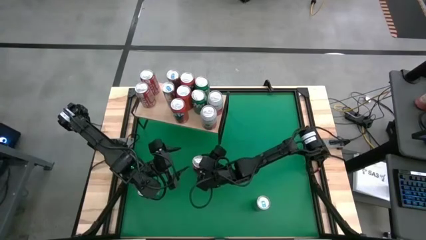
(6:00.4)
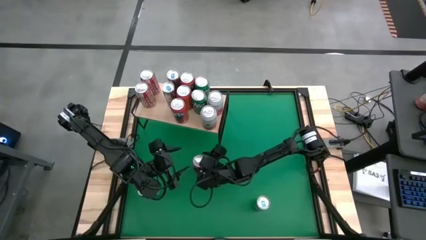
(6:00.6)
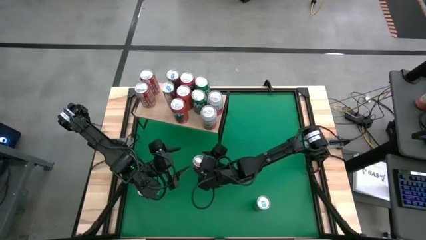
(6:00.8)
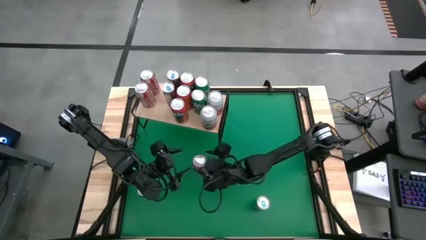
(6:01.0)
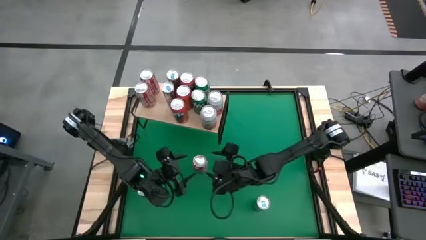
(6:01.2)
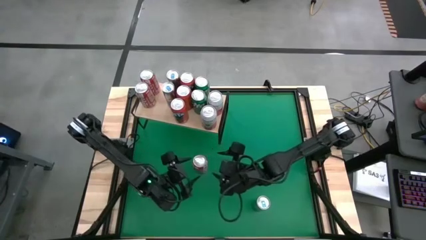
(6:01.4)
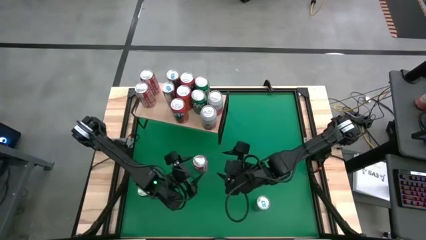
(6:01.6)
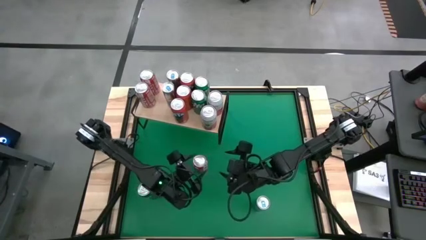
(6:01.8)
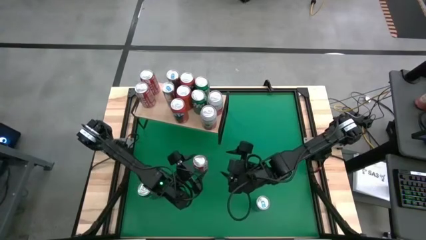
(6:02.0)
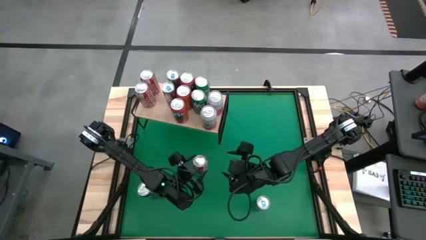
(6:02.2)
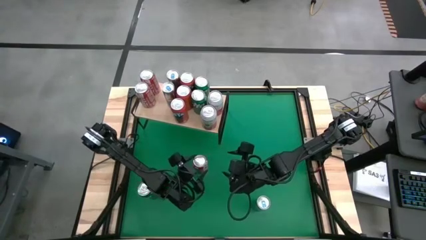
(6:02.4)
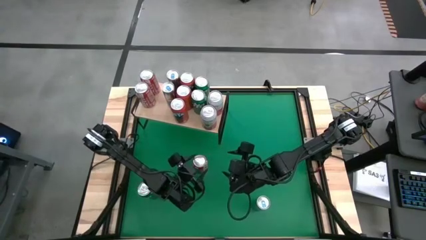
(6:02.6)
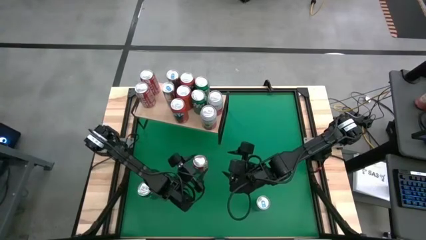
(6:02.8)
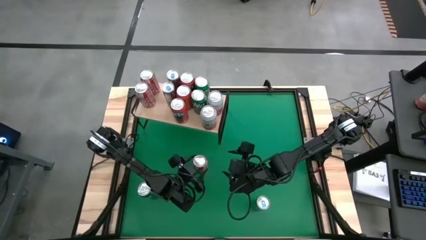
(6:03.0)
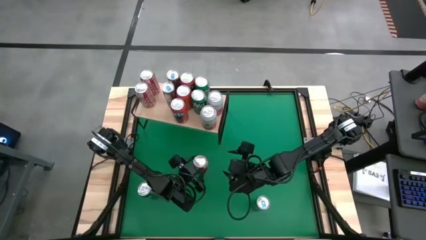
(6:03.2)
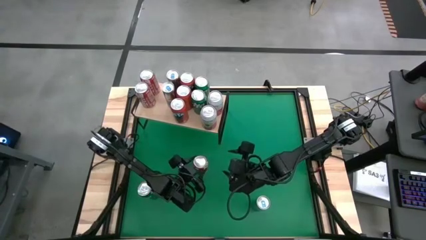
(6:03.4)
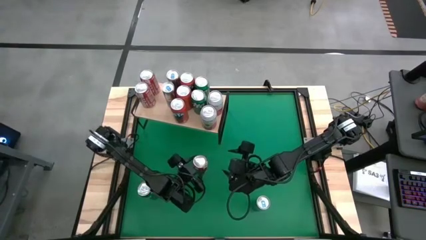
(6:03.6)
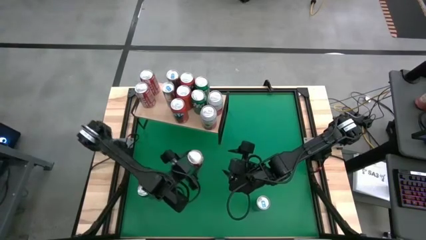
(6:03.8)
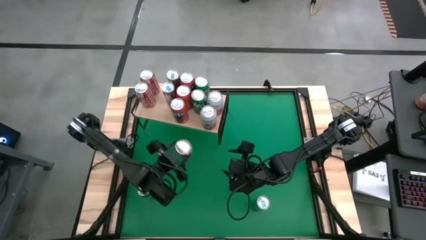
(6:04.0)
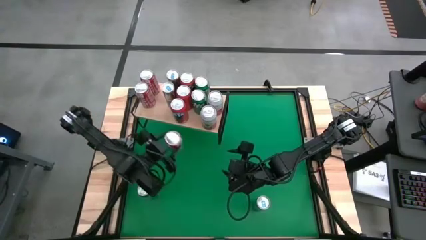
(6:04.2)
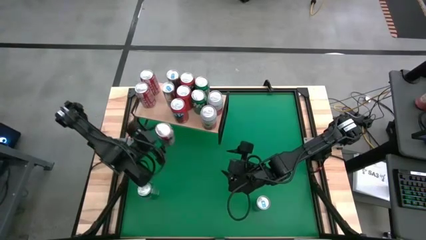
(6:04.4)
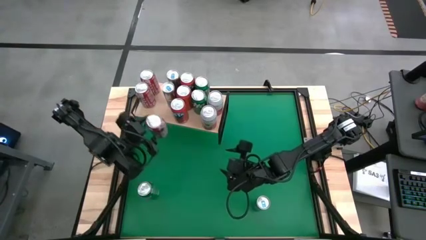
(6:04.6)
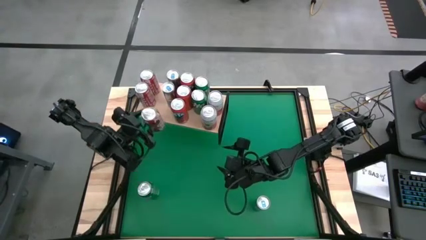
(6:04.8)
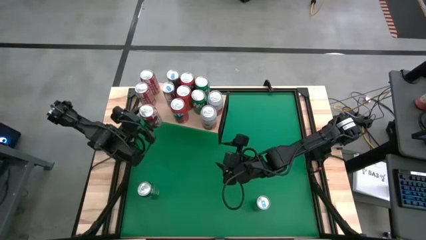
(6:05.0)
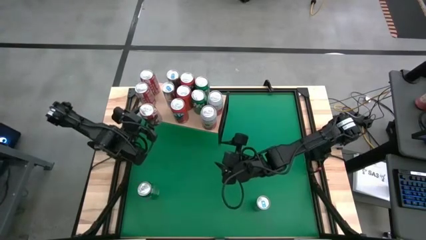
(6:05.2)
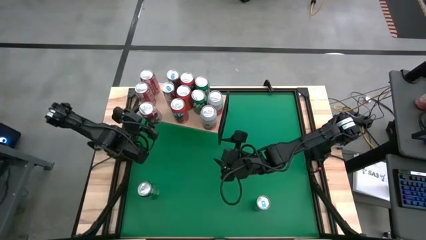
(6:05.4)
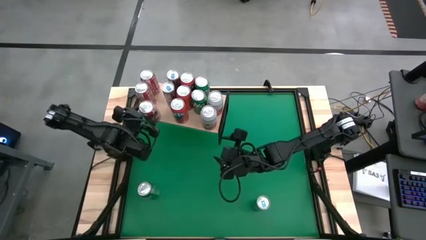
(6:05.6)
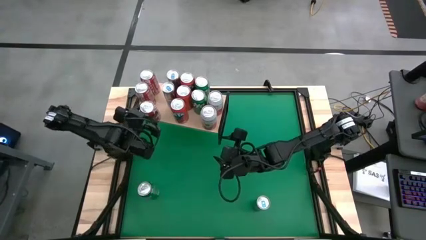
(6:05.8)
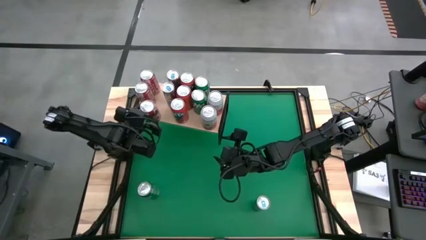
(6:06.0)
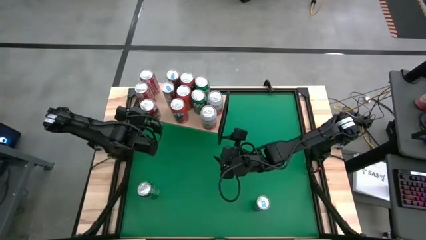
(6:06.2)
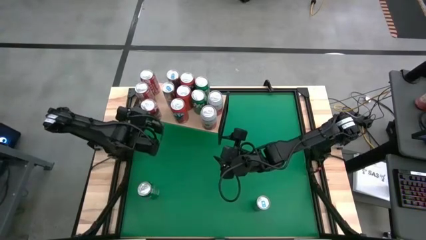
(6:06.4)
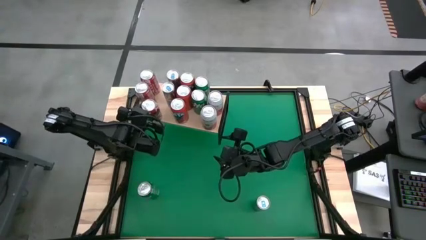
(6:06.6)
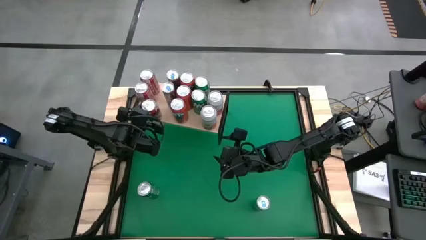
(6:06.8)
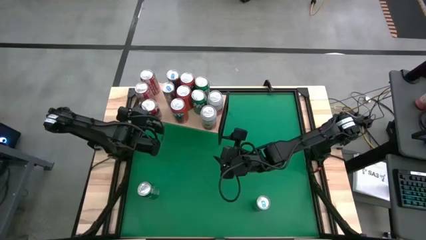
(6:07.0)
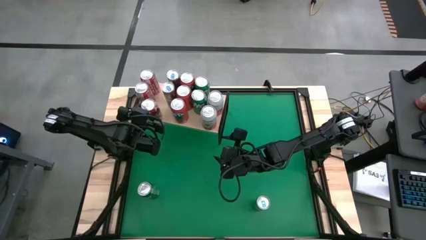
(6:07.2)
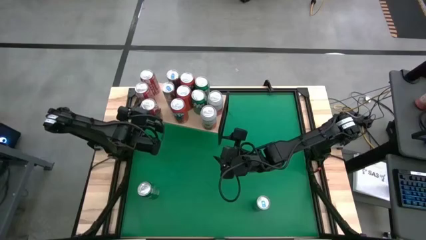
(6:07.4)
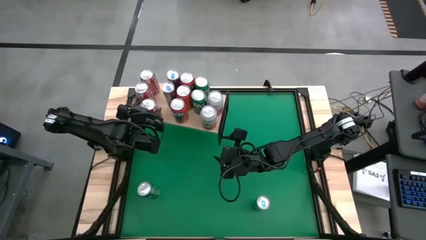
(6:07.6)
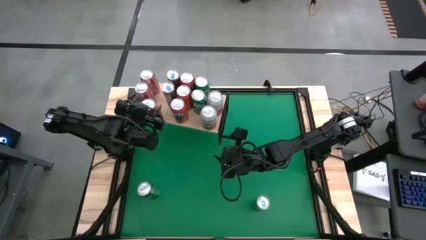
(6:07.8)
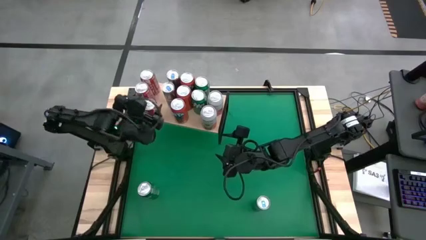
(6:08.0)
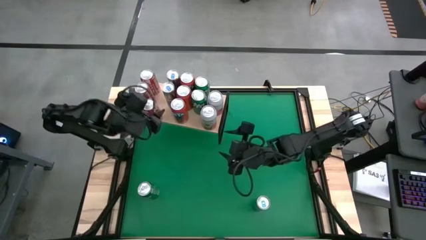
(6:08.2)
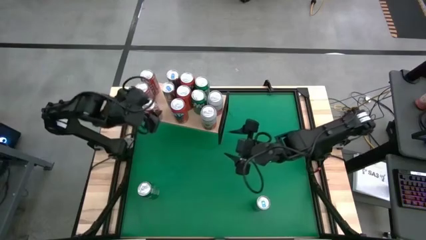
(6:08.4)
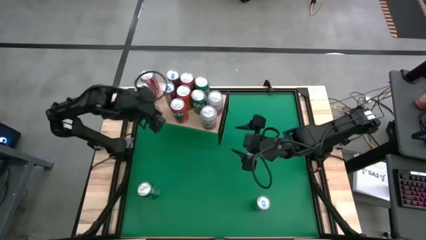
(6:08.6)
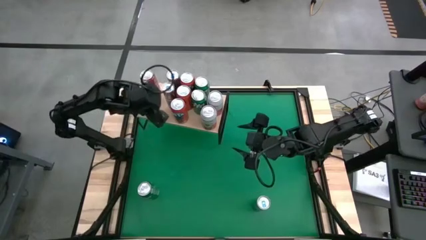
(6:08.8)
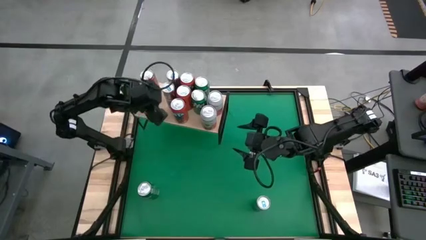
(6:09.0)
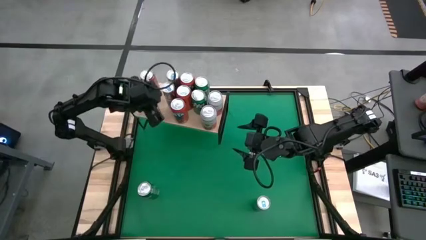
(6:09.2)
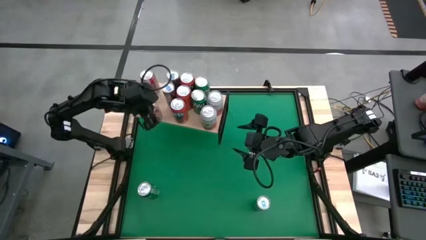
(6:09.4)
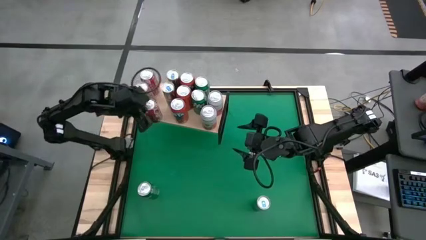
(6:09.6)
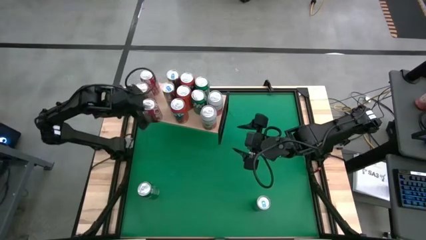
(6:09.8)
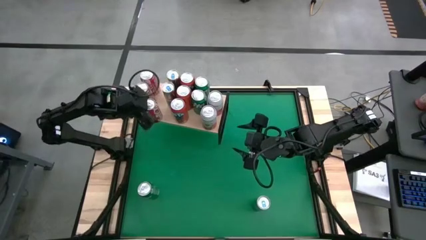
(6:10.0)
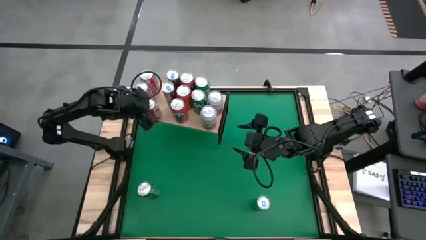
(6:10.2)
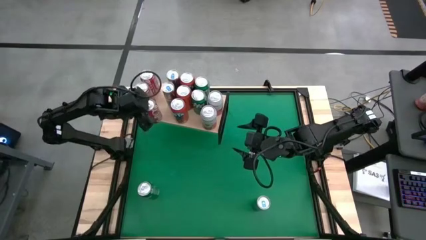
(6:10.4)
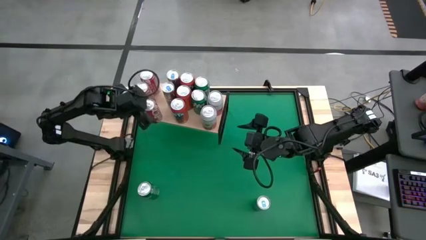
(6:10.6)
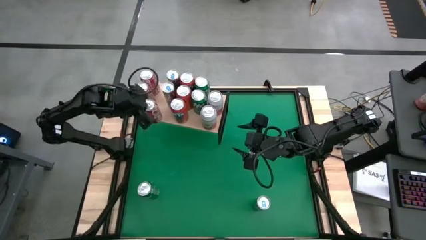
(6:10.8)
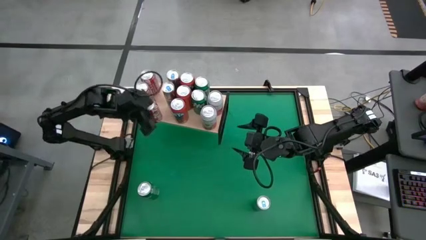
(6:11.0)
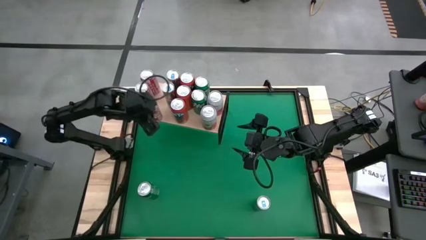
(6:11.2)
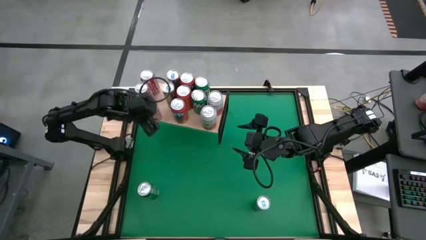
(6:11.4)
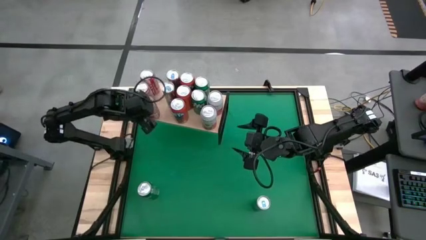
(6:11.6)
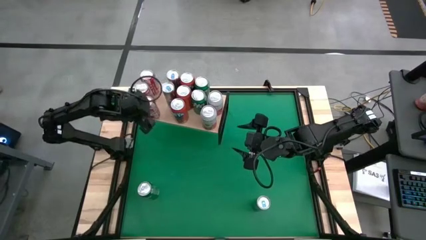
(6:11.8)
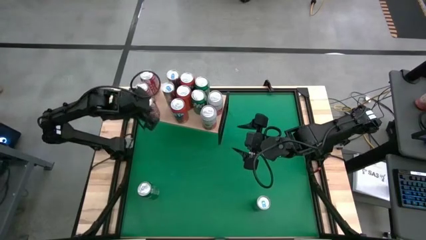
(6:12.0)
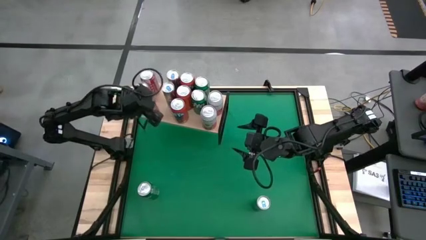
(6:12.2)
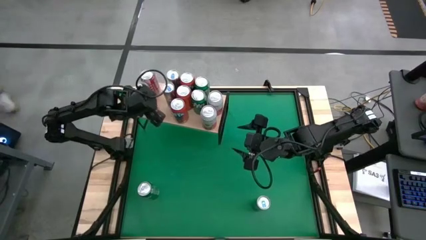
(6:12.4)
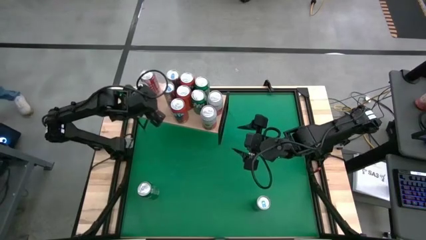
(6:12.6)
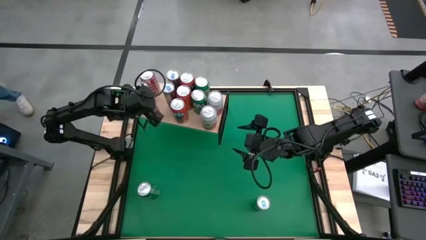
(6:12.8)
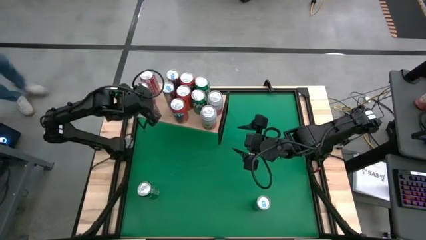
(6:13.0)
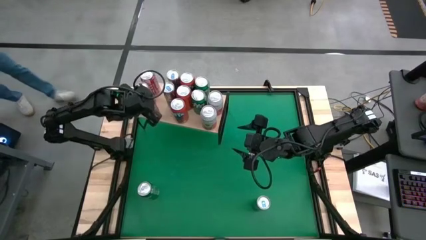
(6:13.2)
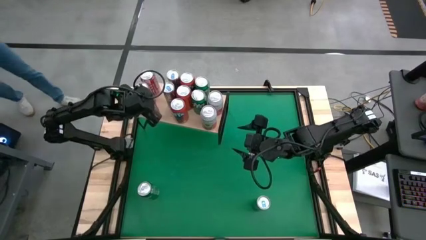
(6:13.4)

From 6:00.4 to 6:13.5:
Task: Place canned beverage on shelf
Put the red/black soda can on the shelf aligned with the other red/black soda can

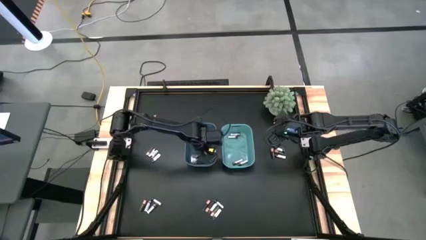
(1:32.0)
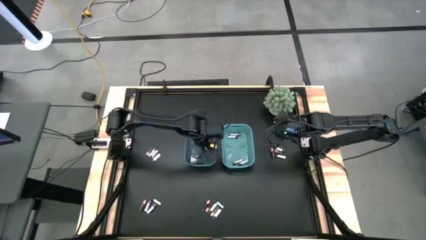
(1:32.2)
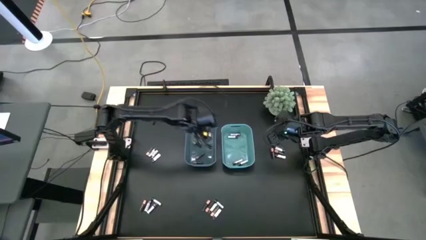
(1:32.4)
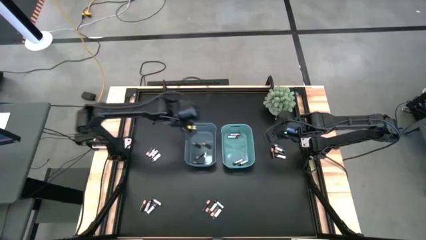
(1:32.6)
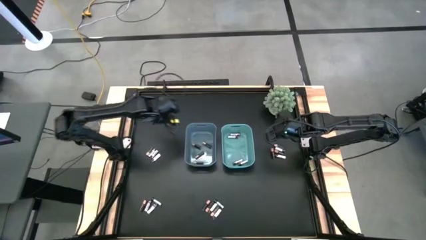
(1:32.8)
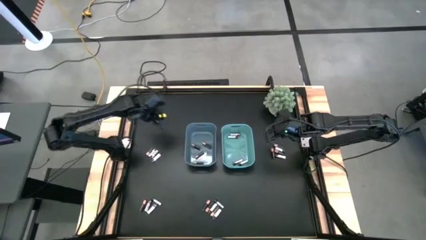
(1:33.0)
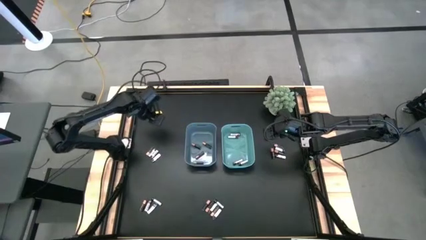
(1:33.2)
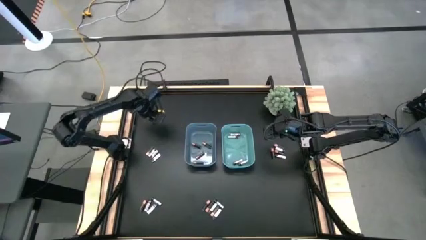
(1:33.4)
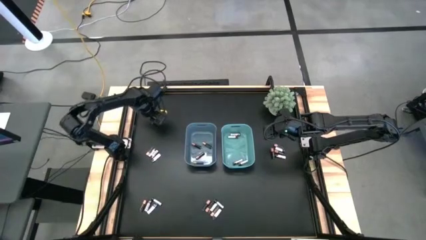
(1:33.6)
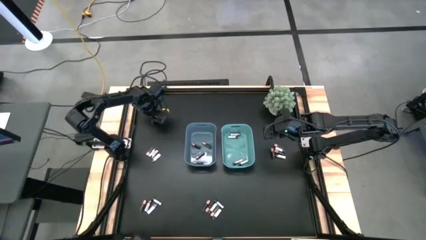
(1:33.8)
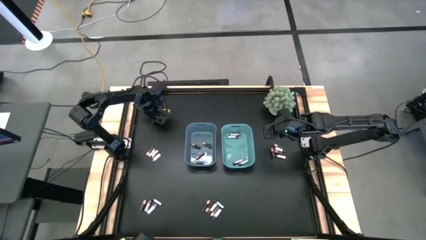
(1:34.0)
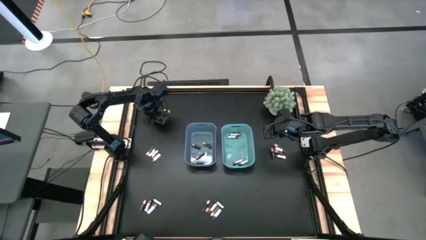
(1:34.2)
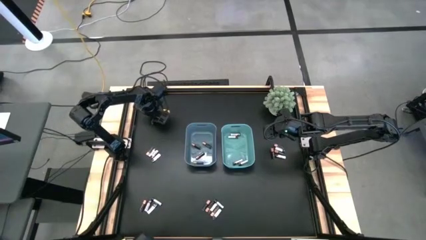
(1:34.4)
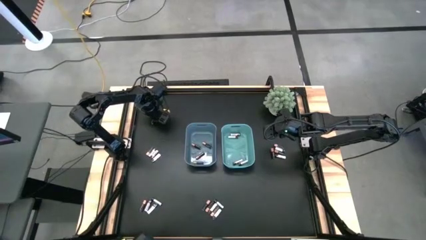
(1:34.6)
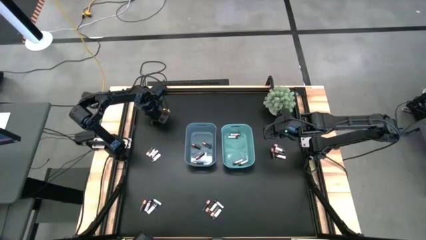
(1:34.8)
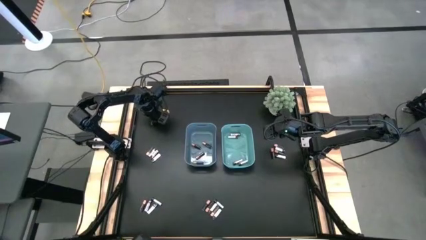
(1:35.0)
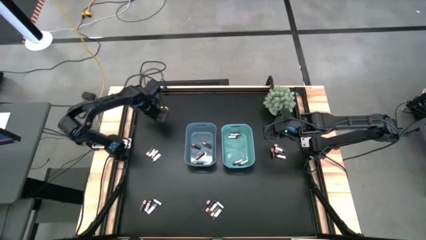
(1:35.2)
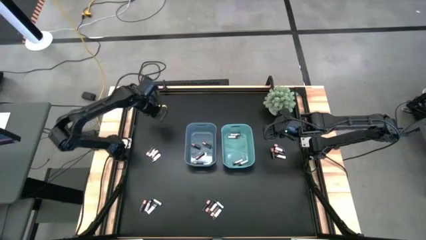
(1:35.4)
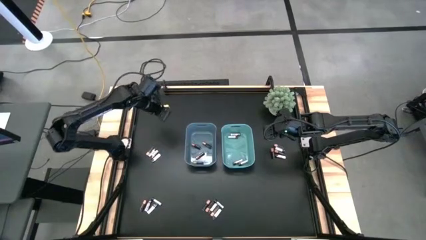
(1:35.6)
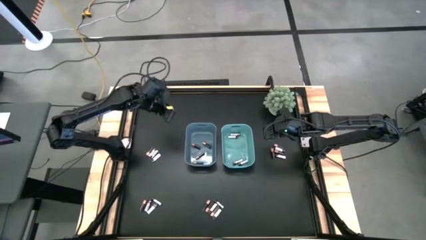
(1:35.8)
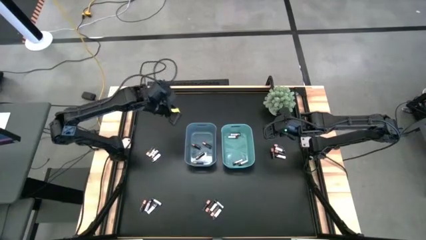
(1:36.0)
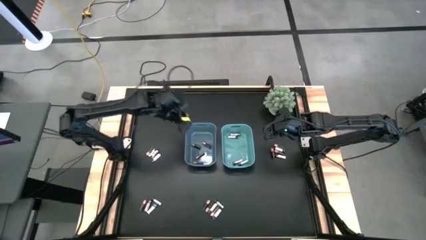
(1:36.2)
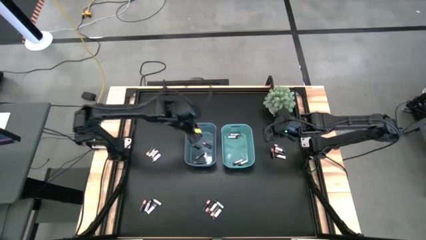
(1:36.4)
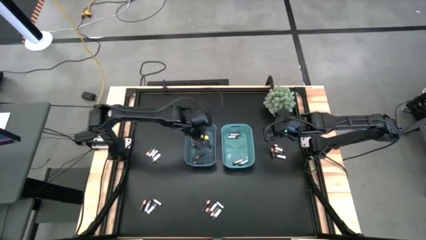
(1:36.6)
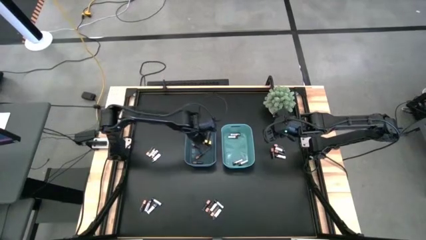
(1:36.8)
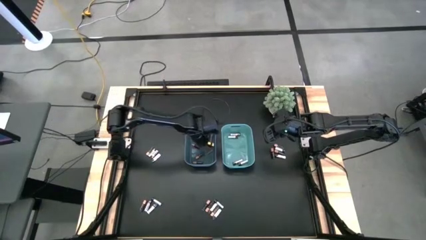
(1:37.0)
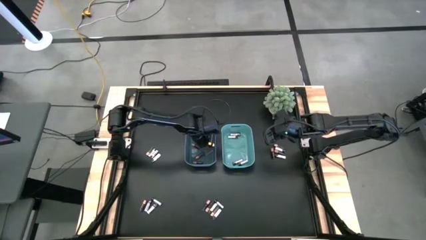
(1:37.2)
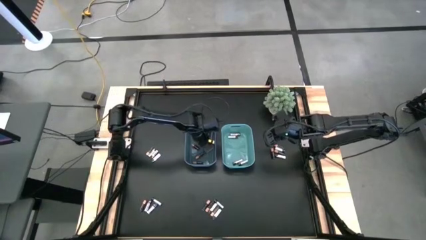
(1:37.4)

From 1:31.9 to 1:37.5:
Task: Sort batteries
Put the black battery into the blue bin
